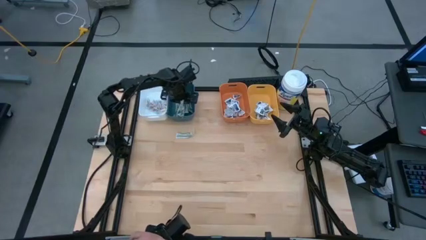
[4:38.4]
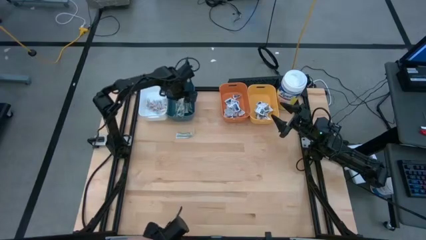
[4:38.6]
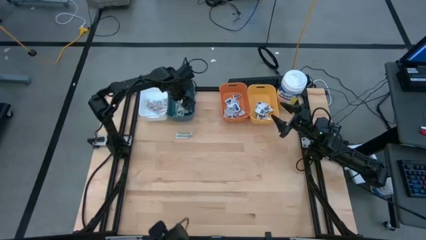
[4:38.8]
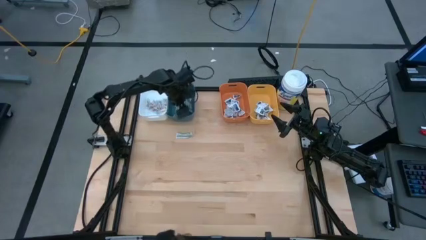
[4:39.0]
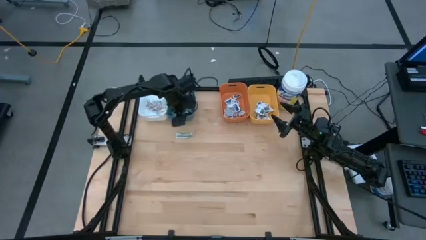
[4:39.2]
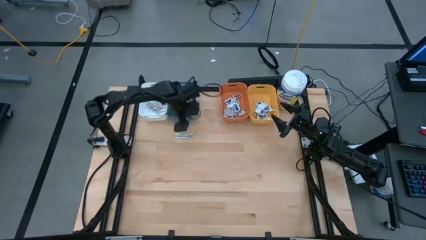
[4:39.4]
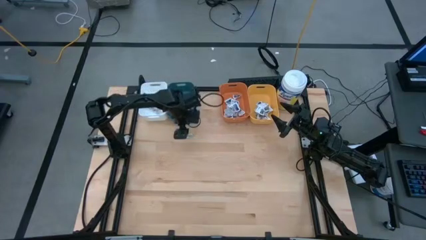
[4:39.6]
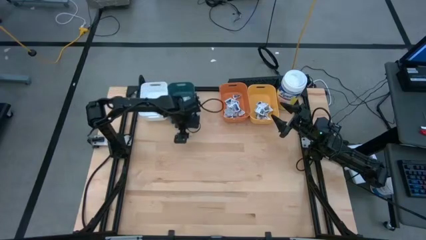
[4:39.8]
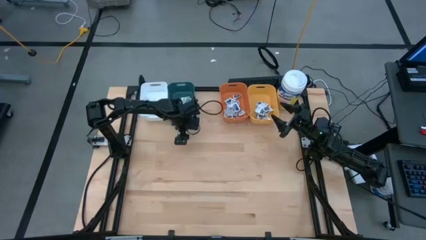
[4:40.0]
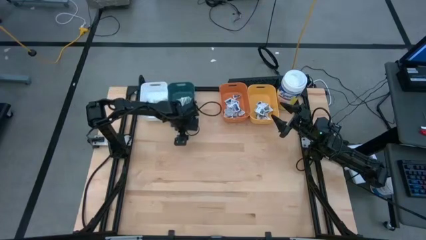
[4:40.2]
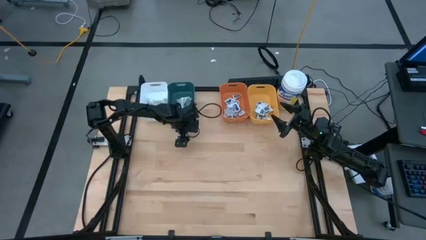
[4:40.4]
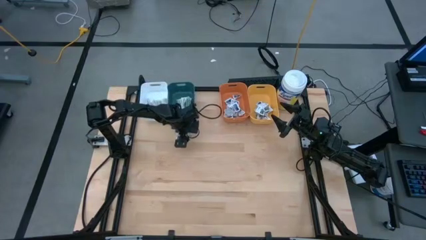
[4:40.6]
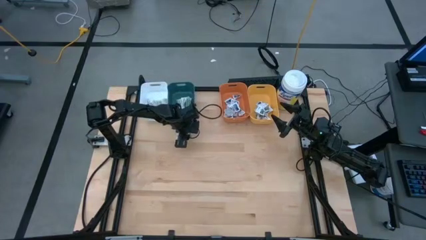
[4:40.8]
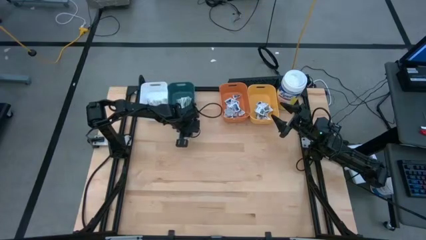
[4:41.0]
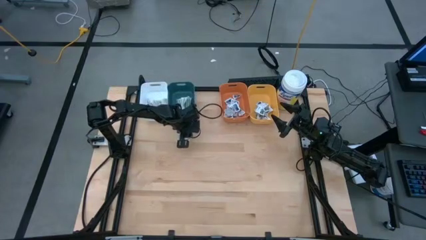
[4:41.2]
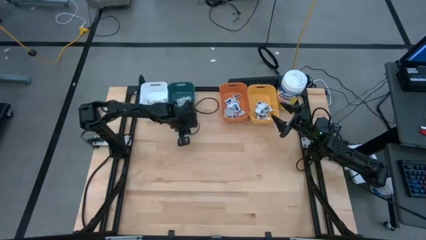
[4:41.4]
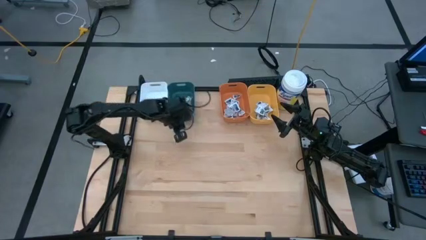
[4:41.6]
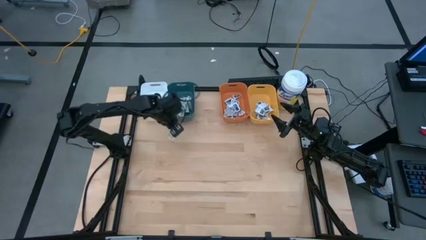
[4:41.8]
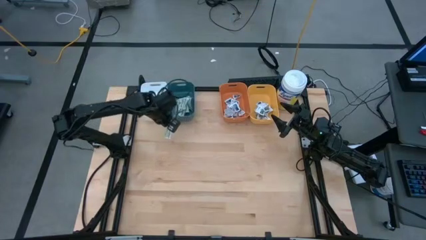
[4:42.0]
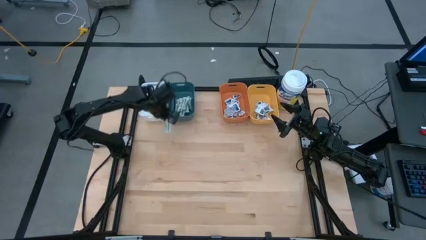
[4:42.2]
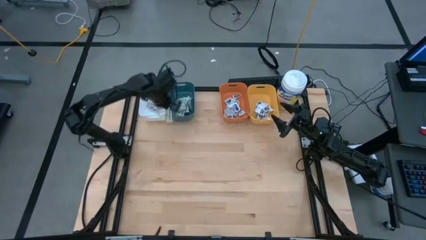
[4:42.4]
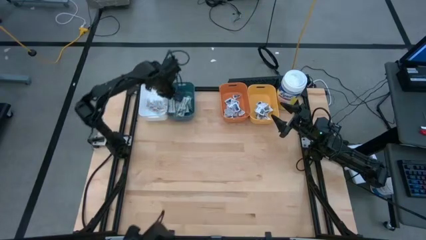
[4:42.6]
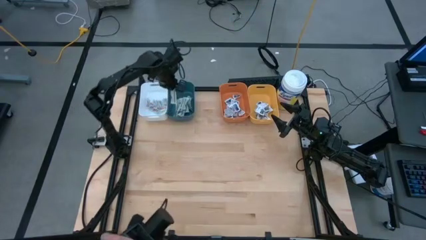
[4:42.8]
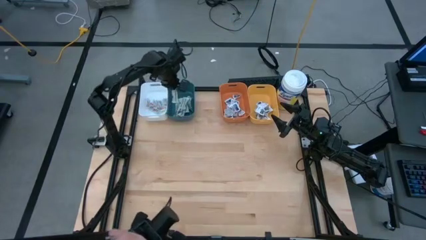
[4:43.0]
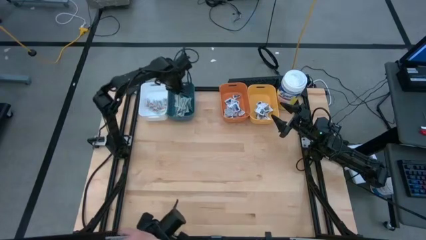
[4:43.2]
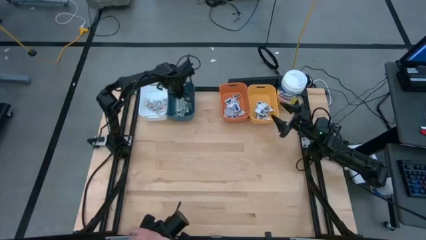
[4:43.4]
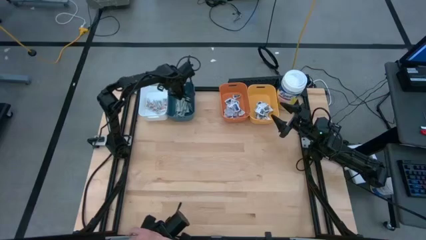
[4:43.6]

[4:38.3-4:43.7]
Task: Pick & Place First Aid Supplies
Put the bandage pack into the blue bin

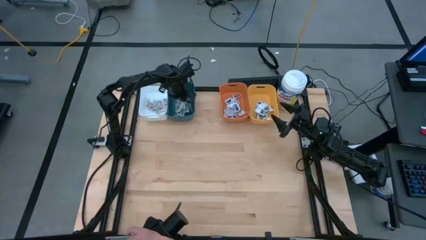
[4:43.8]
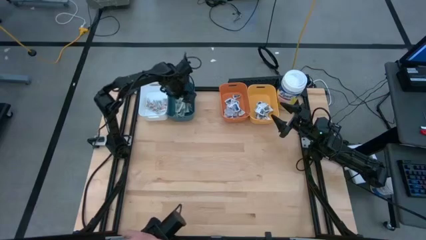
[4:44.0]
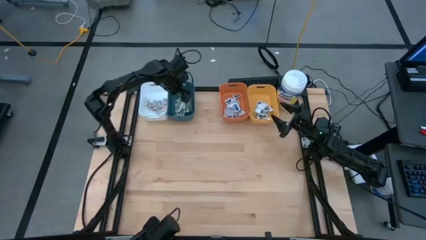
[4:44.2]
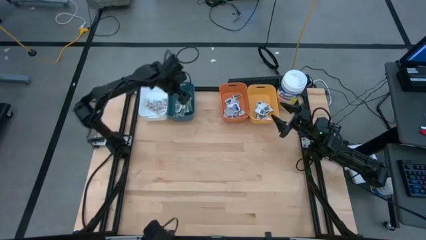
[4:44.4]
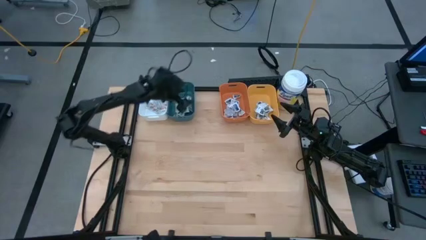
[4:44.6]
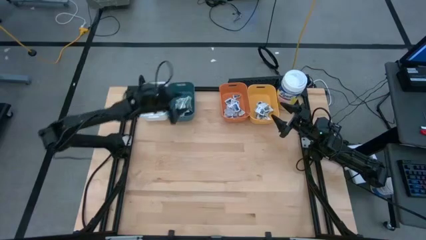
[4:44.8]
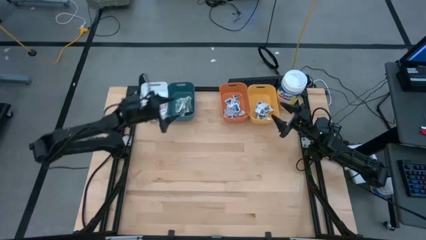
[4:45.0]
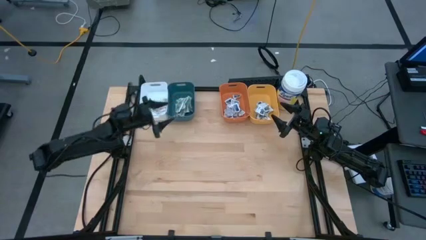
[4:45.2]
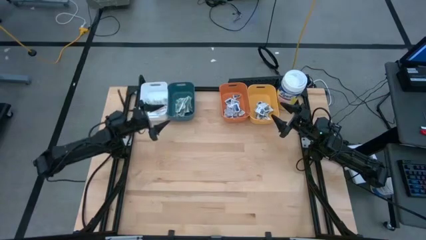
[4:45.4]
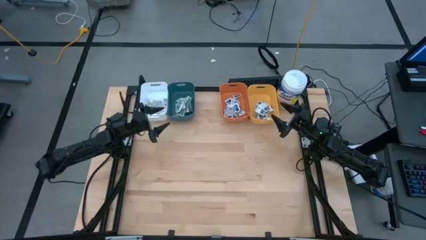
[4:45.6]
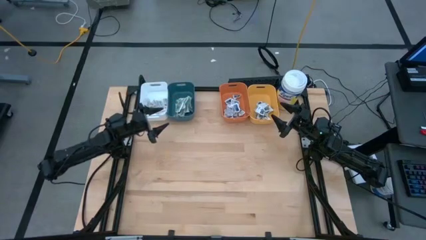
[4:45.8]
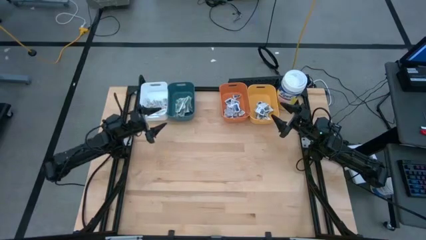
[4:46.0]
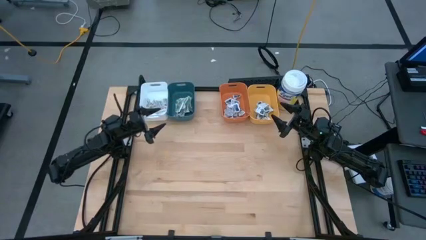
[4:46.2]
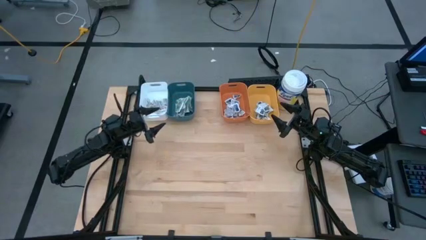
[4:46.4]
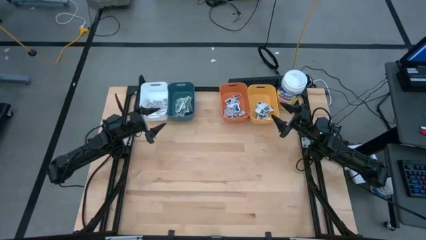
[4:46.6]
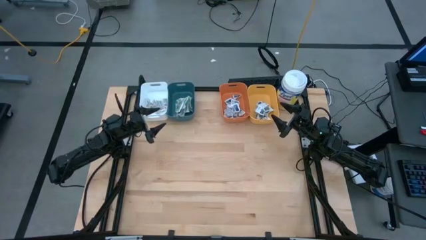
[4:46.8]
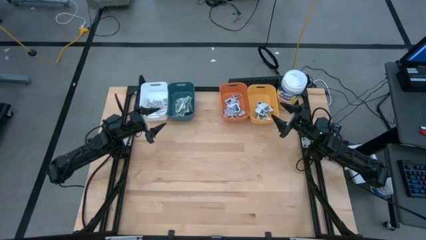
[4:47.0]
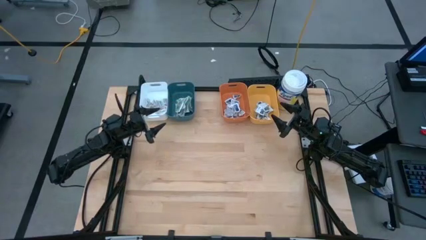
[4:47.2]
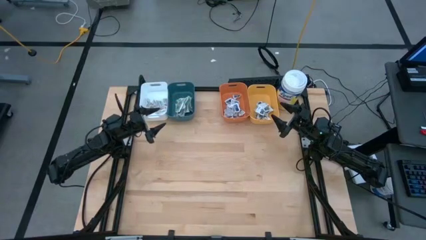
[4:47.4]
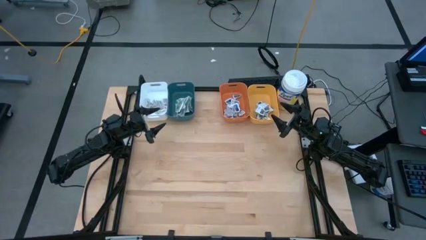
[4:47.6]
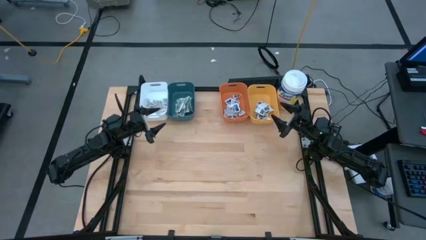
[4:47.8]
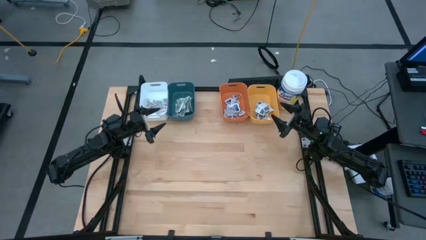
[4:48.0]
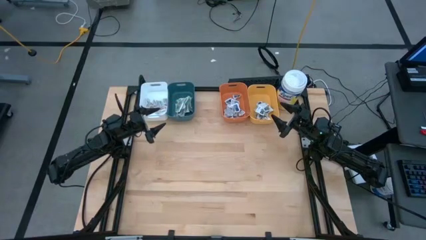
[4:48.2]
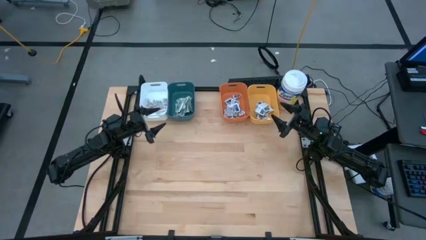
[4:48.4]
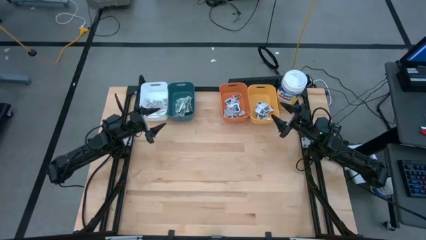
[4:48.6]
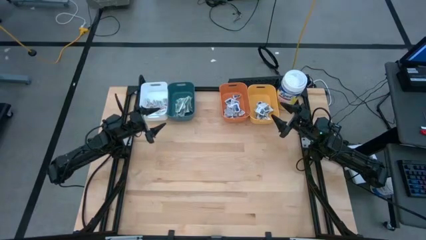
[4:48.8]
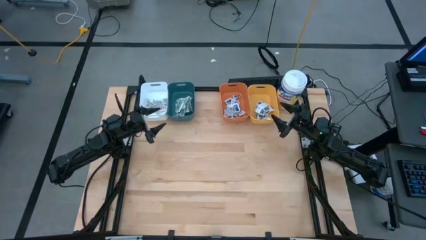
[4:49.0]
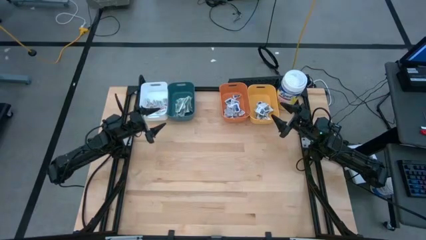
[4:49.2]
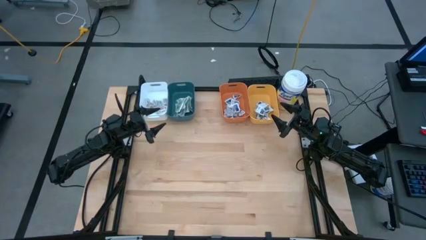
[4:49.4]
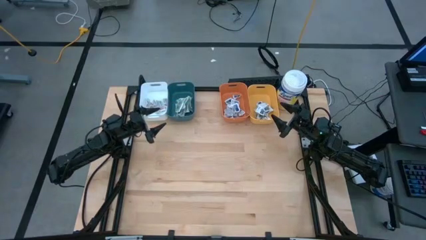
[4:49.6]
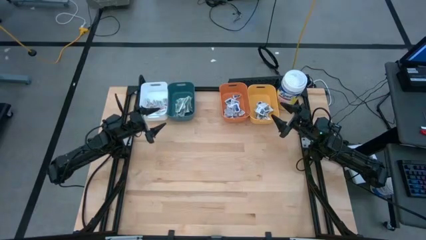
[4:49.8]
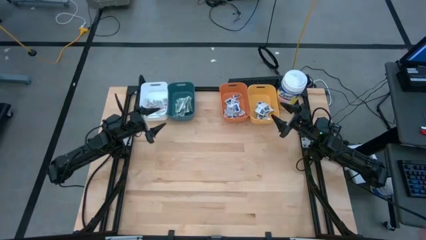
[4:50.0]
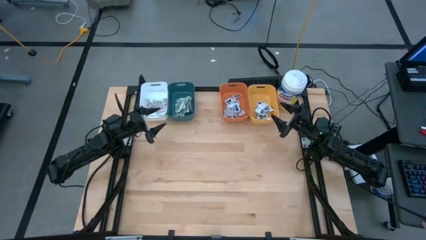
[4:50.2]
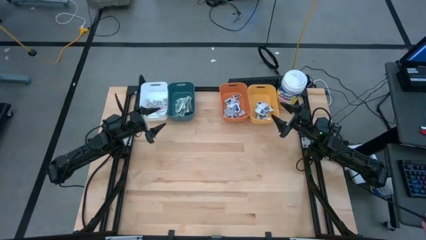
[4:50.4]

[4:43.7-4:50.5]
Return to Home Position
